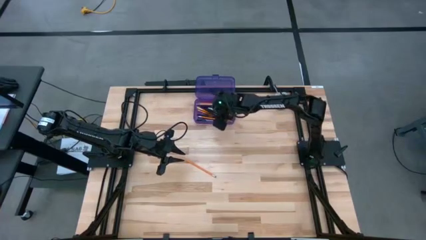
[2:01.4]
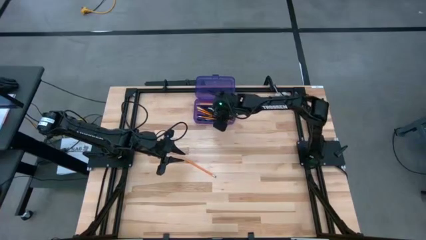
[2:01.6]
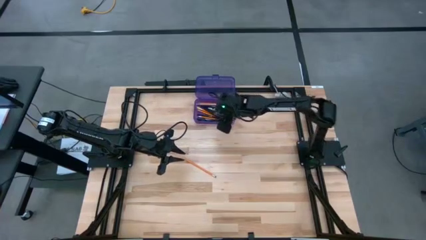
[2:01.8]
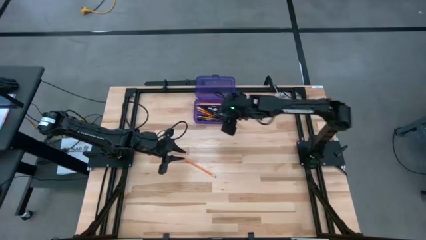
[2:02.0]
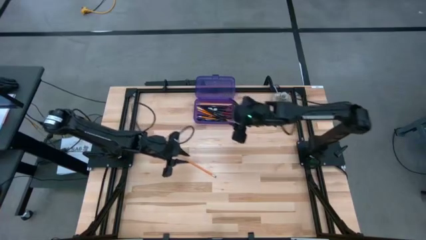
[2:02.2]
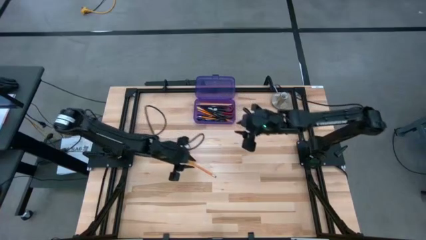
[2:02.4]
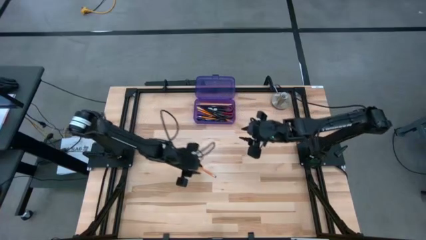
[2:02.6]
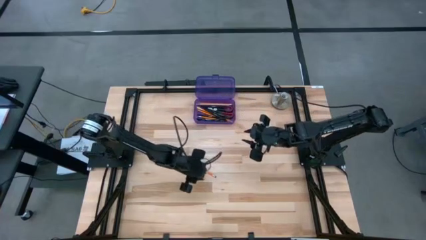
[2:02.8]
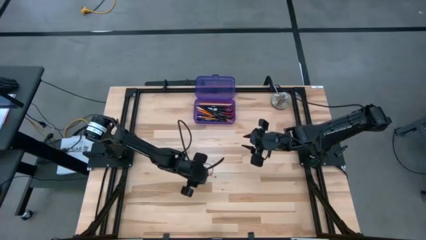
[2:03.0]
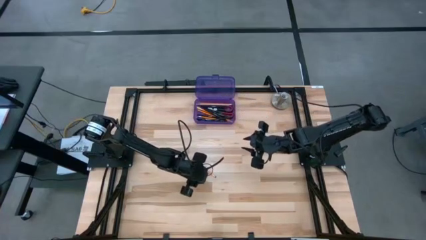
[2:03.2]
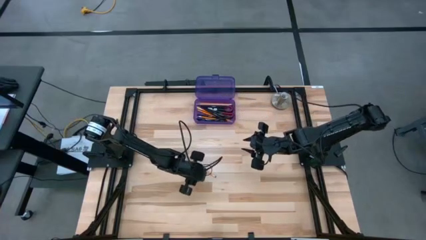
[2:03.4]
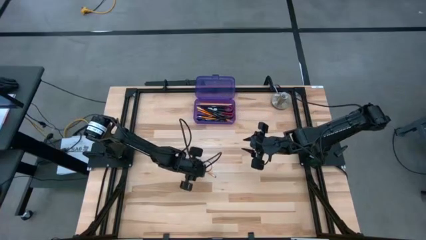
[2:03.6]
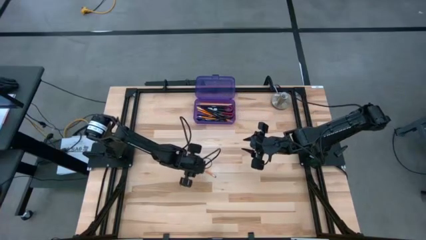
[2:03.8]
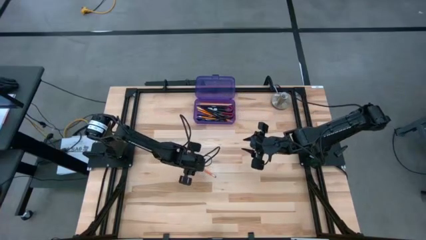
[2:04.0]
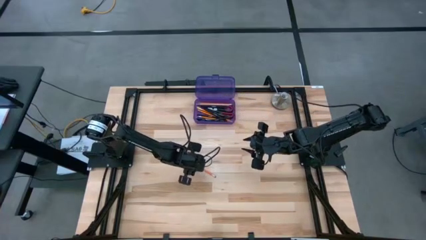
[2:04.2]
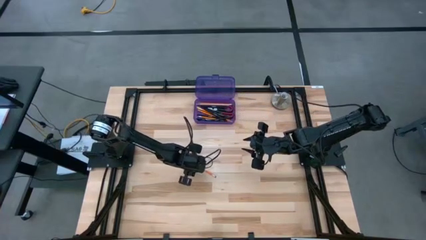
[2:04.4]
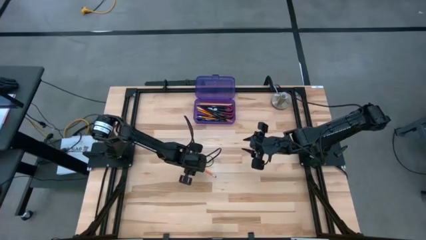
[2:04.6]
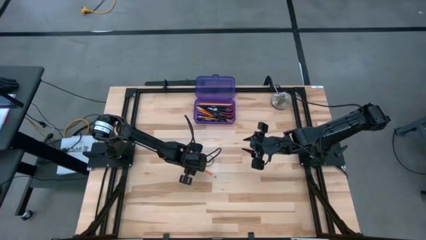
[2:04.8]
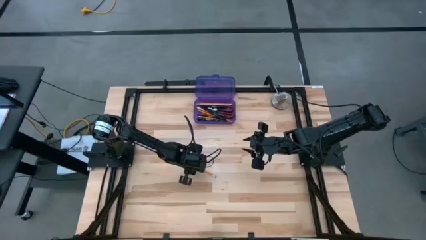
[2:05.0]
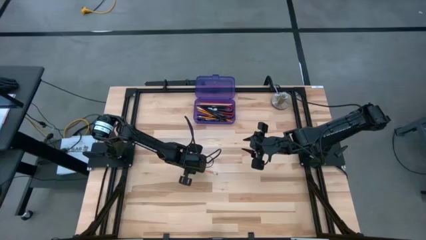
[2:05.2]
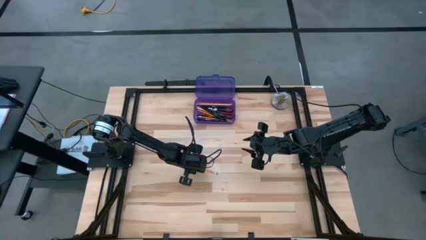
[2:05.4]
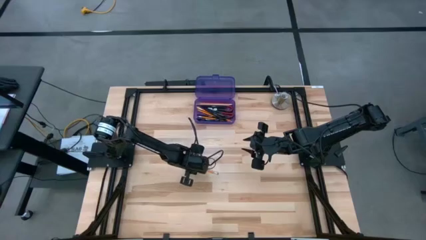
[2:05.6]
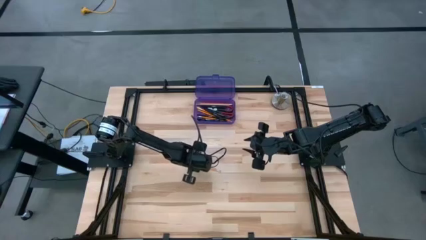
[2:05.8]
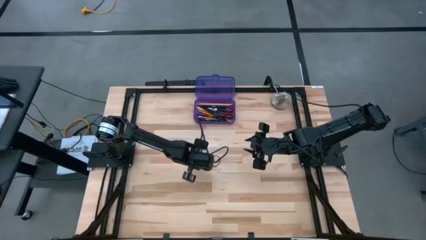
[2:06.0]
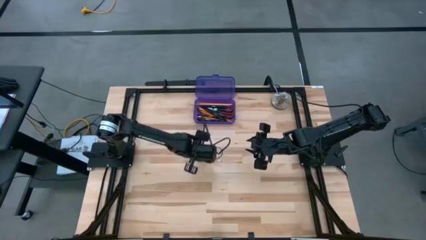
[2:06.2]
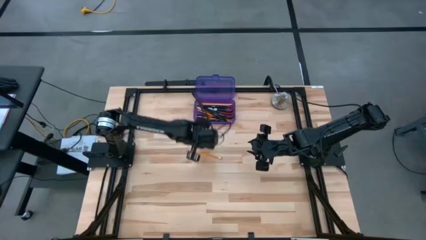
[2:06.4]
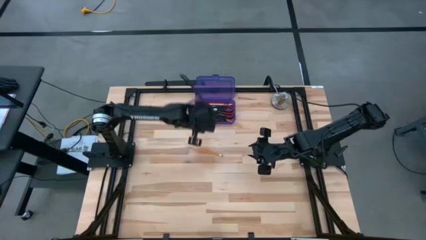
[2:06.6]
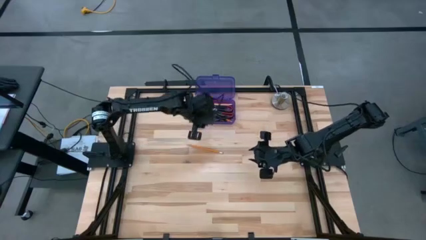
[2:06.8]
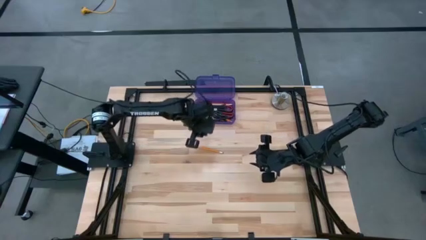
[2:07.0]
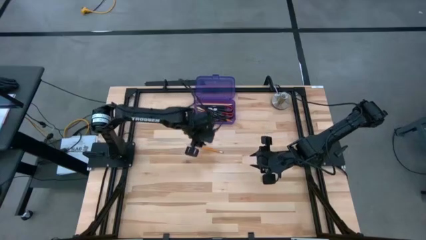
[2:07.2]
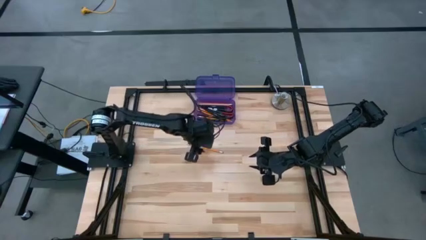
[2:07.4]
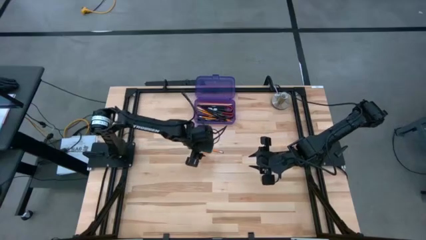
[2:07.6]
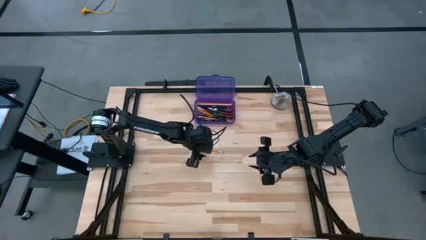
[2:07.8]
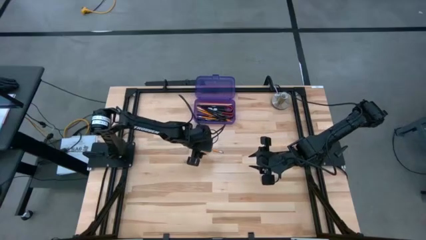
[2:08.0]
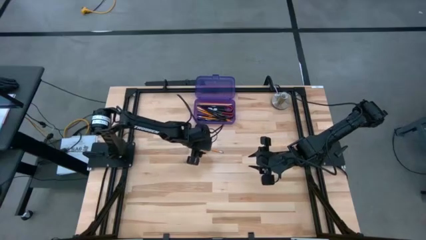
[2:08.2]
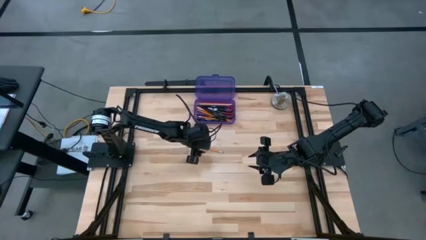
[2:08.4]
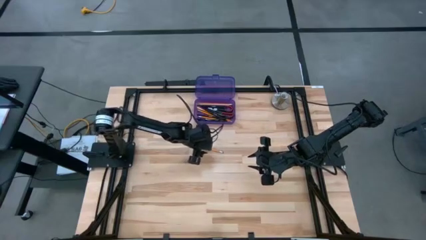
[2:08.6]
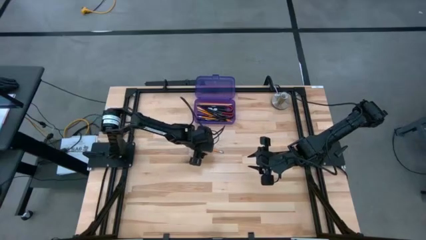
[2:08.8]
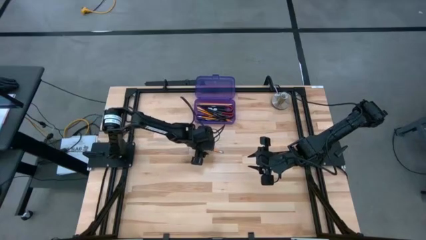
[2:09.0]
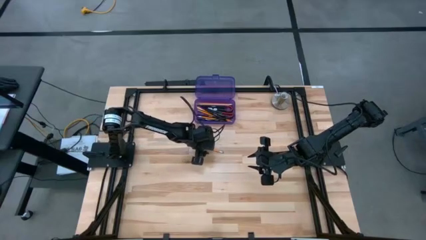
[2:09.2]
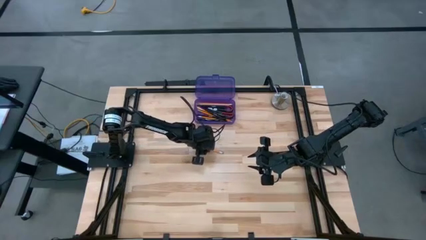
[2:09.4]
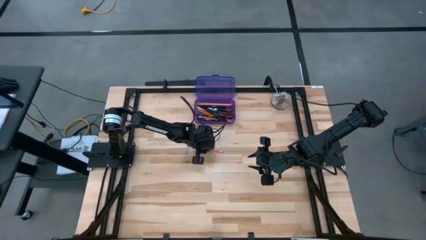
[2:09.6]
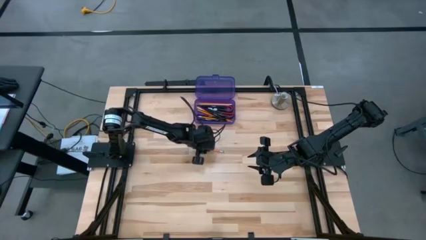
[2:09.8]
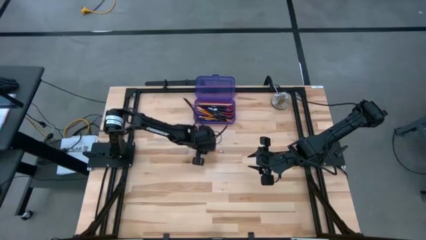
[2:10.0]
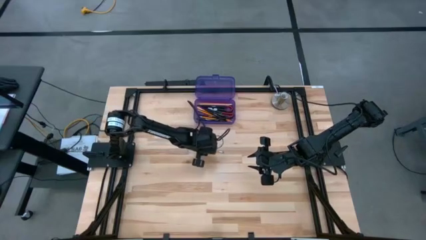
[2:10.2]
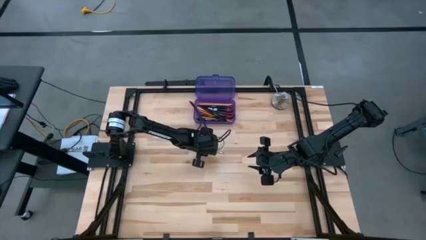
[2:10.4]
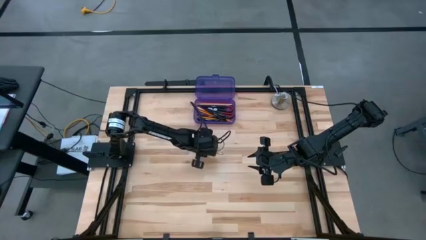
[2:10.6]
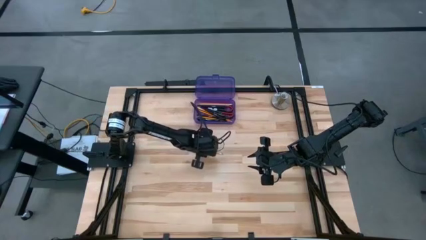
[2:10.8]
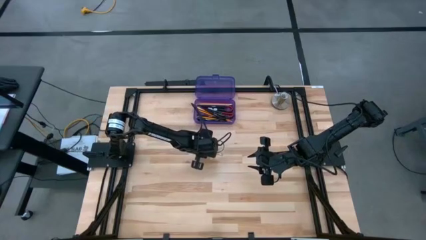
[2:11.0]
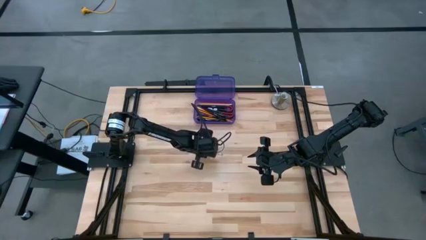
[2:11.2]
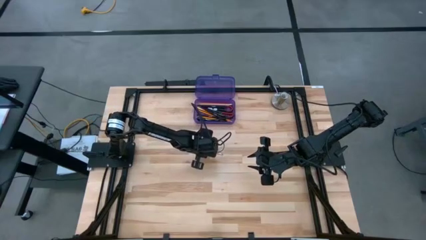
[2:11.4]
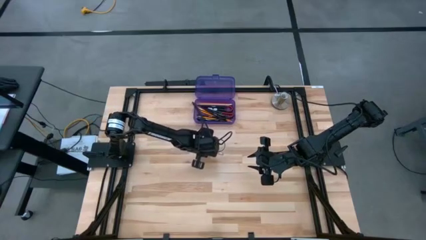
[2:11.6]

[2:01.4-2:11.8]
Task: Pick & place school supplies into a supply box
Put the yellow pencil into the violet supply box

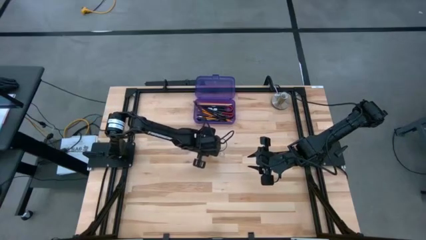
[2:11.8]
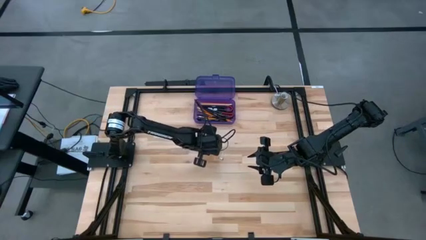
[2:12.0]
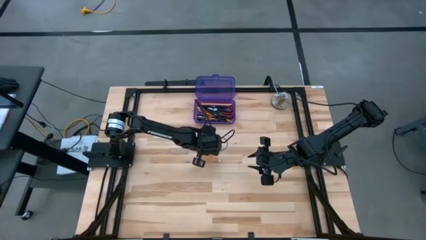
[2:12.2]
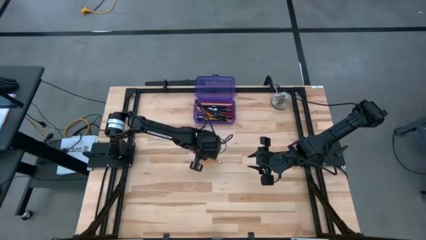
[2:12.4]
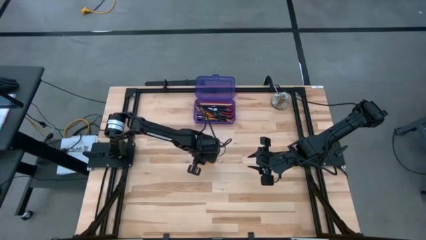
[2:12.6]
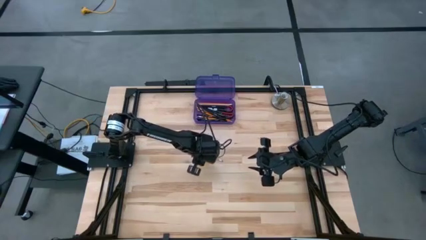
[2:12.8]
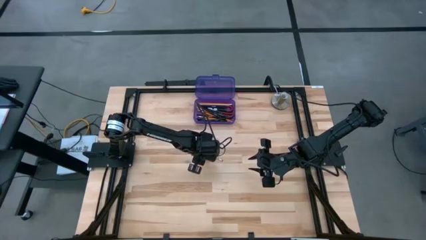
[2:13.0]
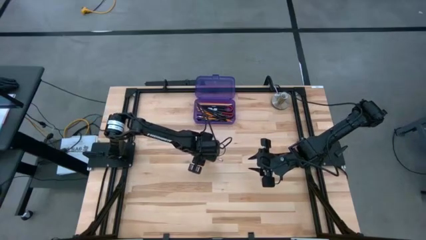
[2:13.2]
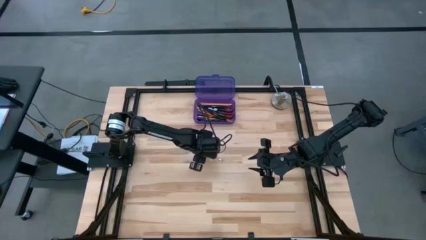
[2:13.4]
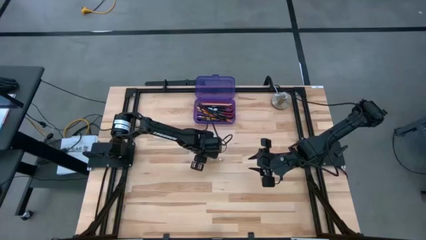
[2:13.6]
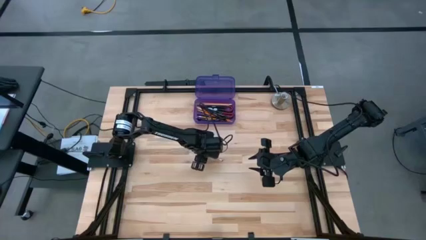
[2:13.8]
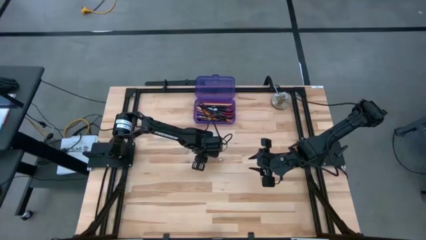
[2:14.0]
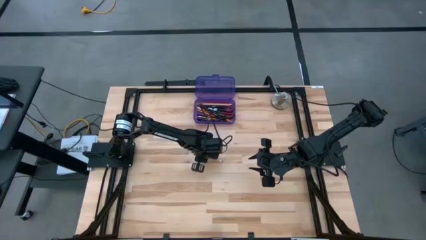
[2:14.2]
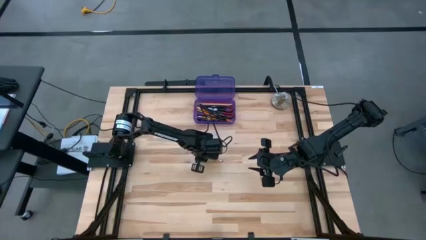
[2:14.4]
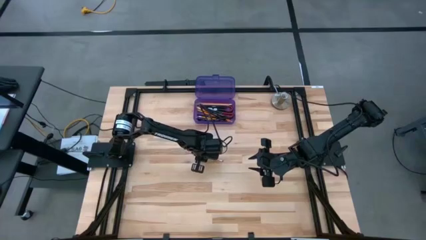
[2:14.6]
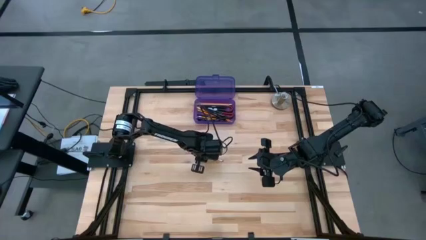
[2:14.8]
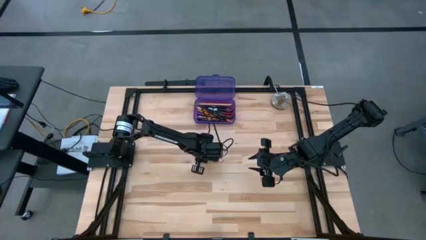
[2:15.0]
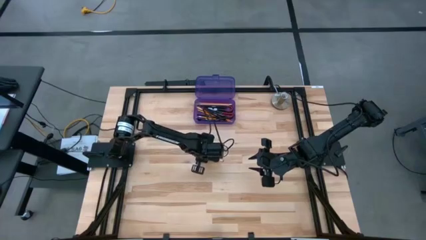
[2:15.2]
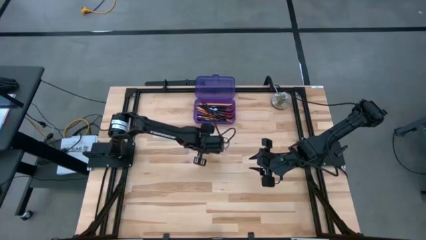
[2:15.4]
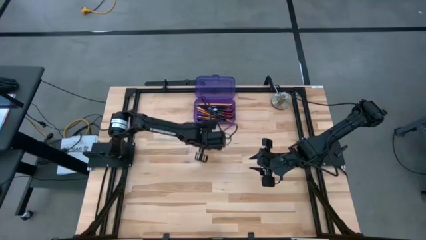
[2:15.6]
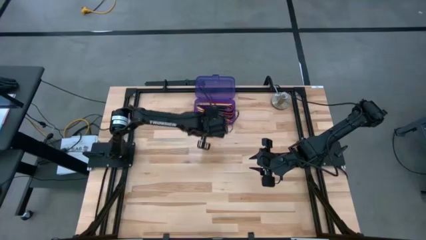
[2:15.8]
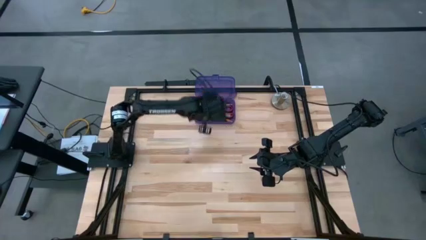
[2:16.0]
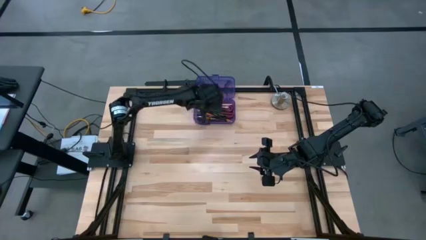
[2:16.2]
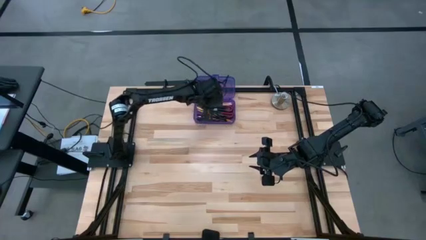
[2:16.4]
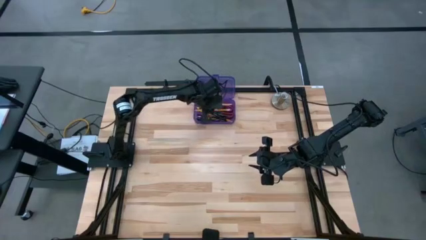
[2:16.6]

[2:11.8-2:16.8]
Put the yellow pencil into the violet supply box
